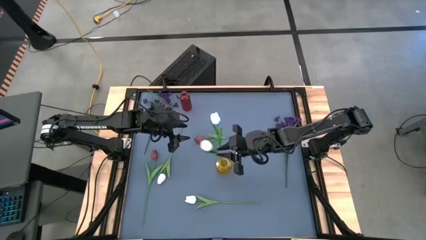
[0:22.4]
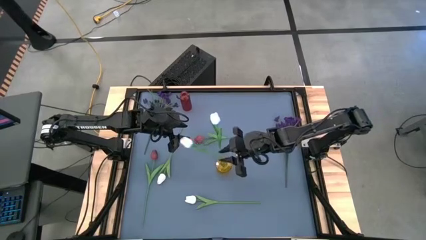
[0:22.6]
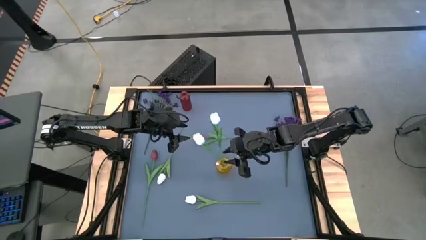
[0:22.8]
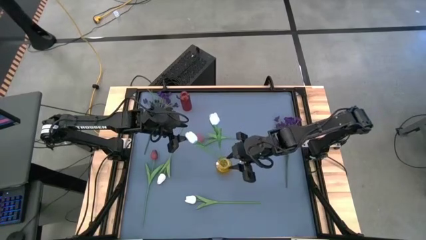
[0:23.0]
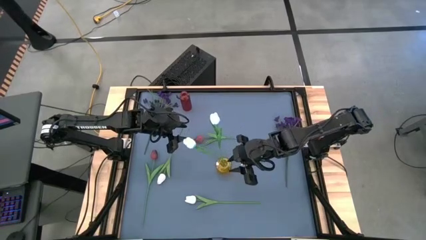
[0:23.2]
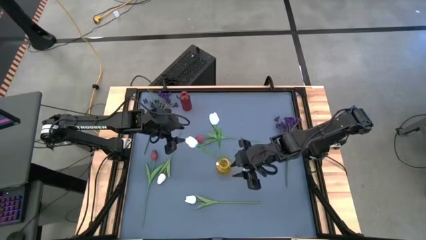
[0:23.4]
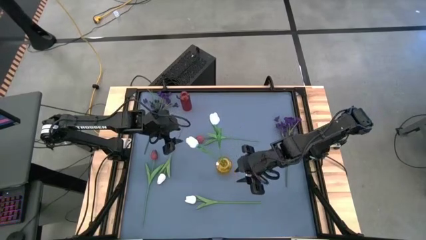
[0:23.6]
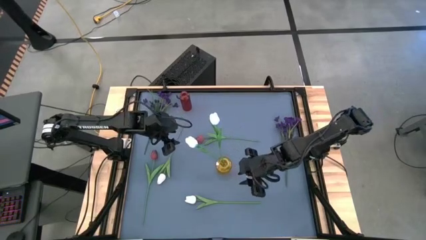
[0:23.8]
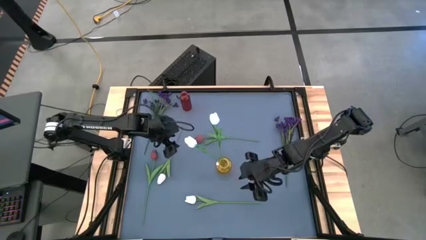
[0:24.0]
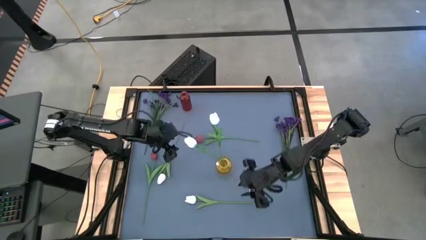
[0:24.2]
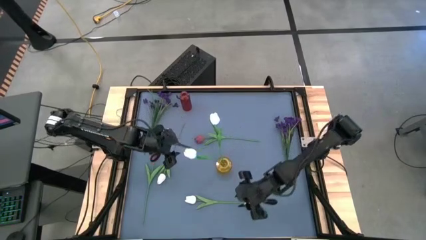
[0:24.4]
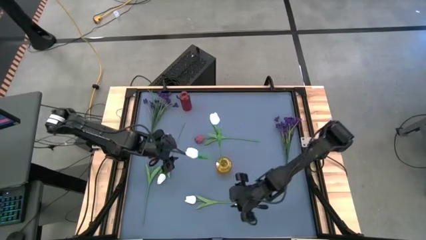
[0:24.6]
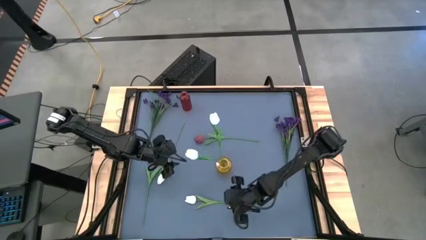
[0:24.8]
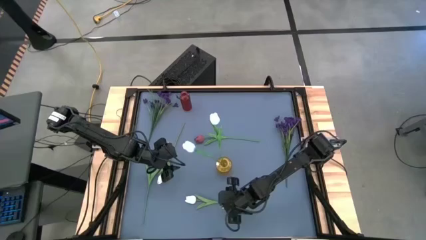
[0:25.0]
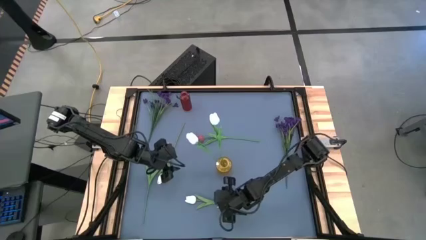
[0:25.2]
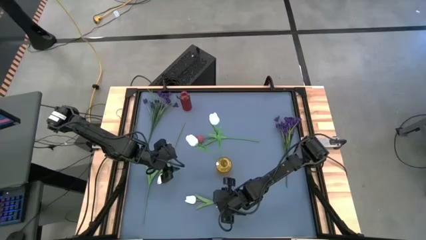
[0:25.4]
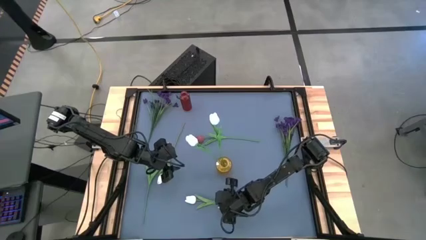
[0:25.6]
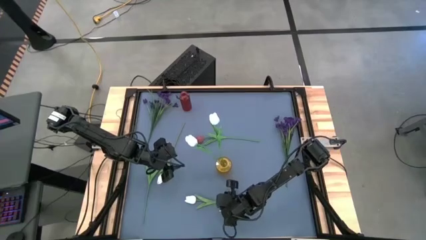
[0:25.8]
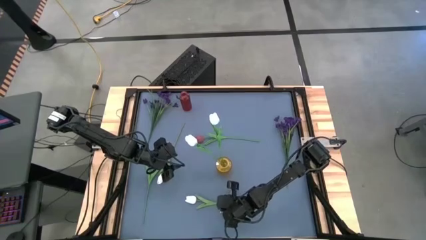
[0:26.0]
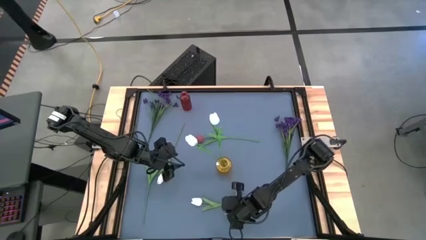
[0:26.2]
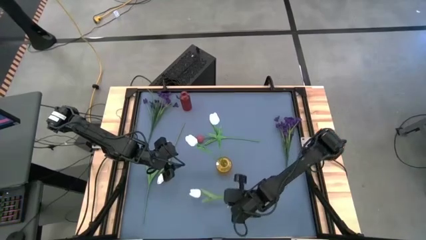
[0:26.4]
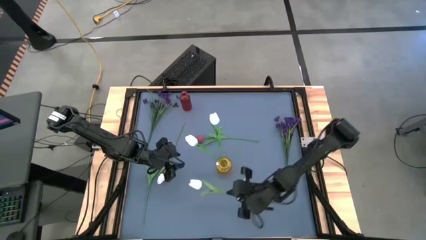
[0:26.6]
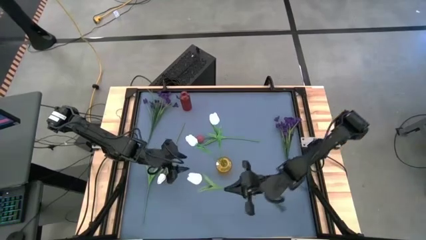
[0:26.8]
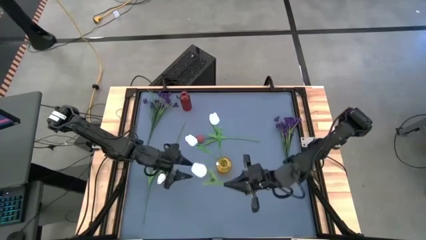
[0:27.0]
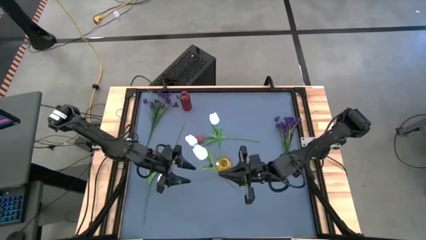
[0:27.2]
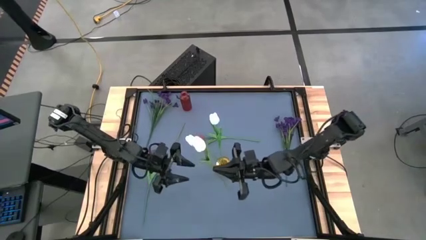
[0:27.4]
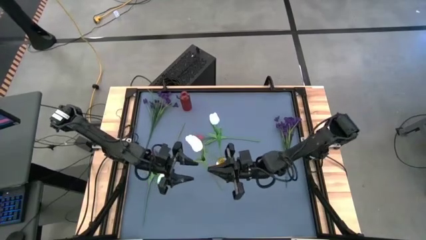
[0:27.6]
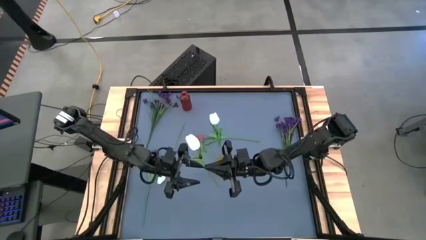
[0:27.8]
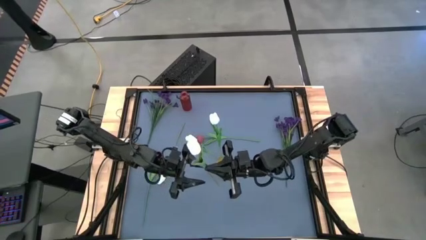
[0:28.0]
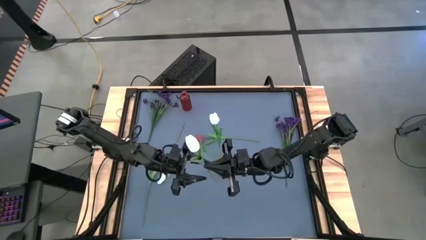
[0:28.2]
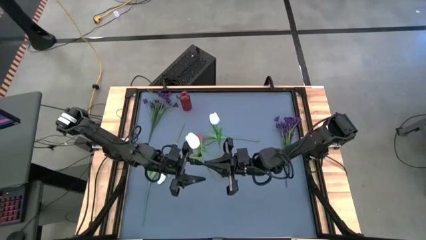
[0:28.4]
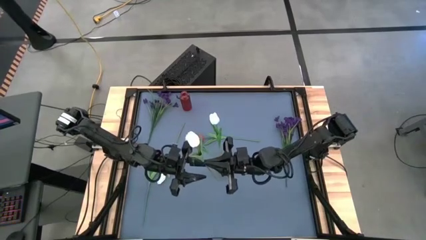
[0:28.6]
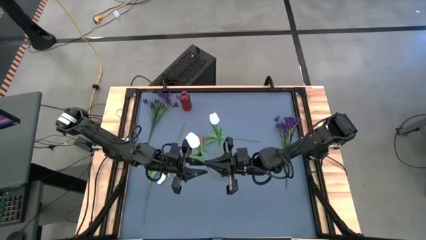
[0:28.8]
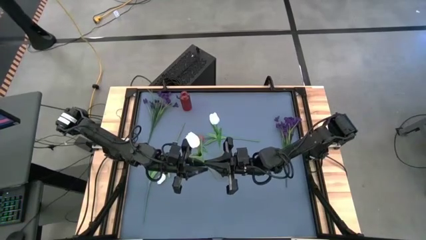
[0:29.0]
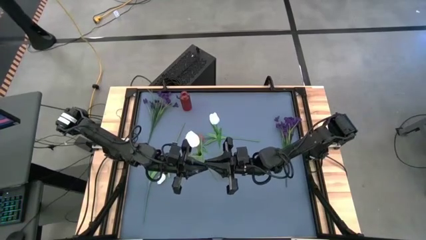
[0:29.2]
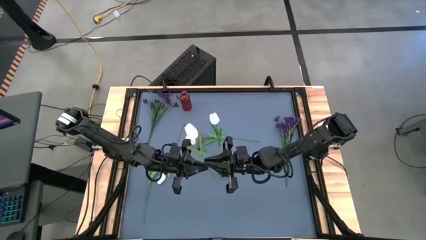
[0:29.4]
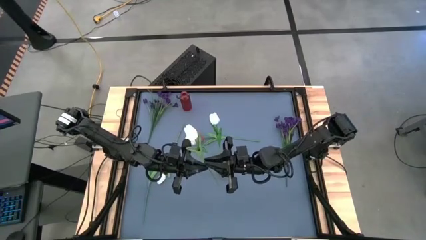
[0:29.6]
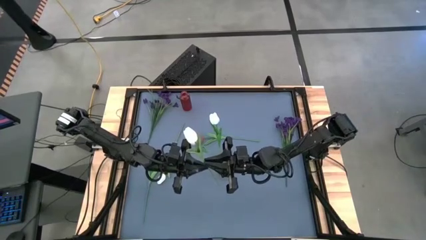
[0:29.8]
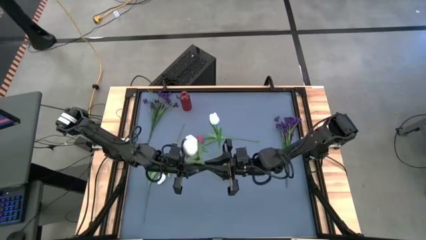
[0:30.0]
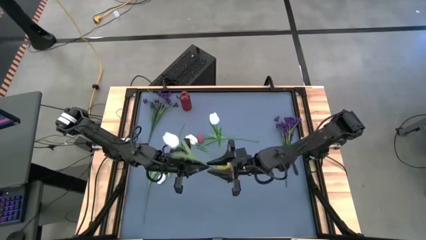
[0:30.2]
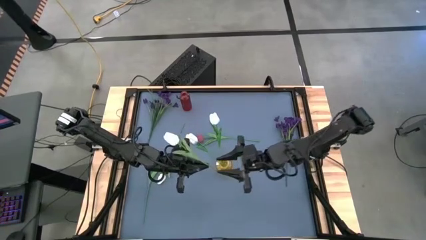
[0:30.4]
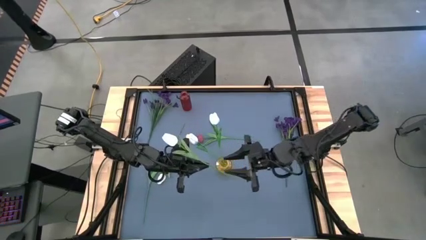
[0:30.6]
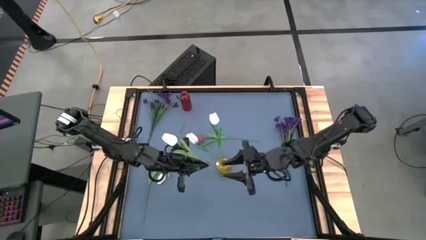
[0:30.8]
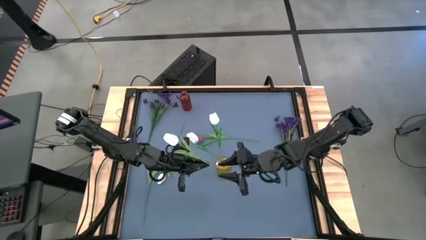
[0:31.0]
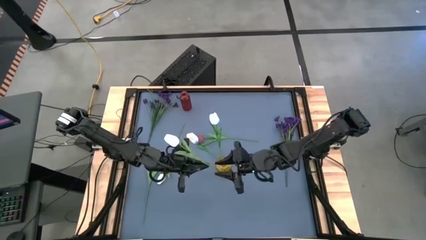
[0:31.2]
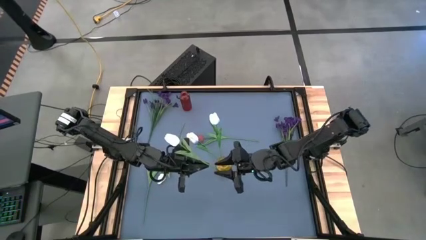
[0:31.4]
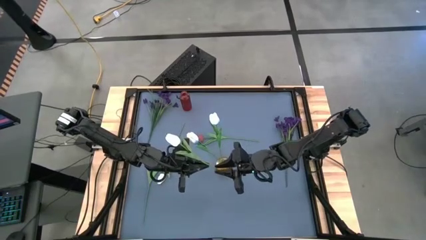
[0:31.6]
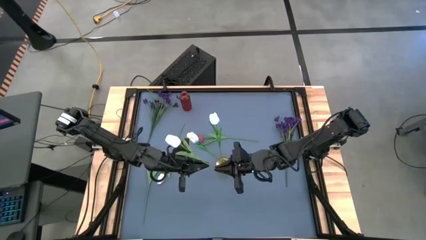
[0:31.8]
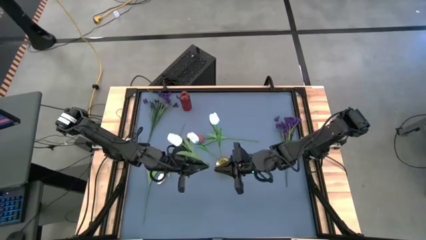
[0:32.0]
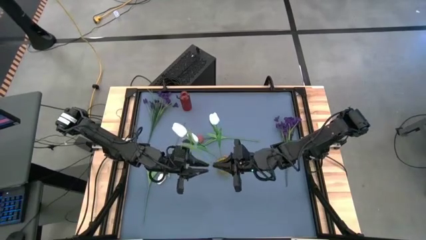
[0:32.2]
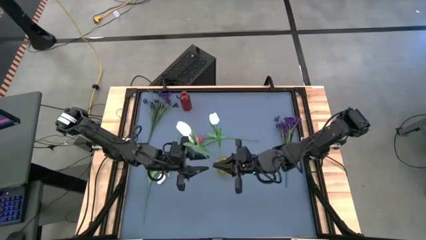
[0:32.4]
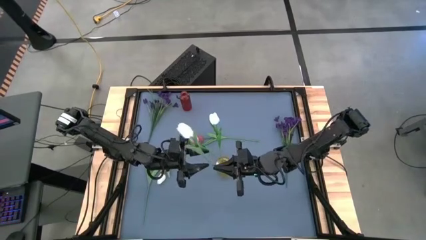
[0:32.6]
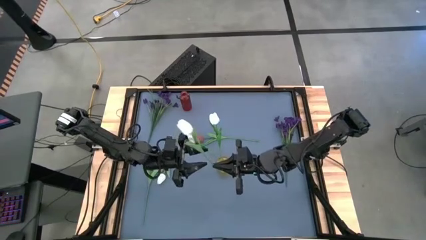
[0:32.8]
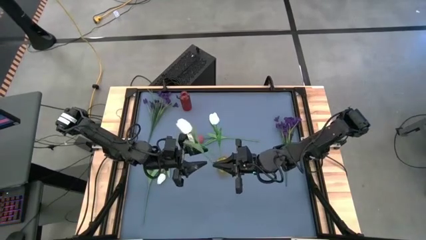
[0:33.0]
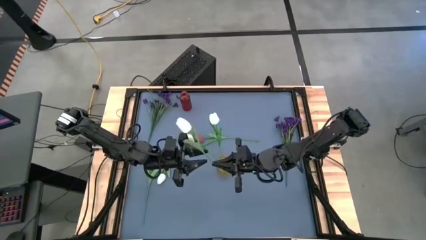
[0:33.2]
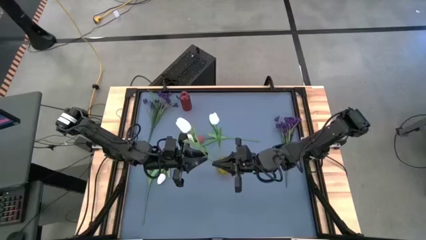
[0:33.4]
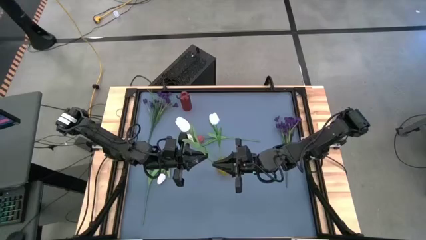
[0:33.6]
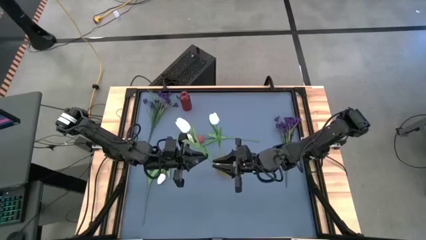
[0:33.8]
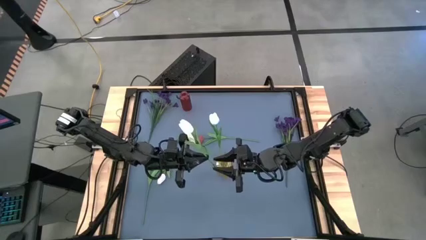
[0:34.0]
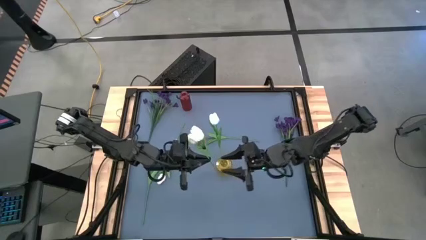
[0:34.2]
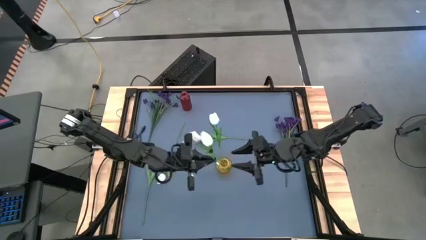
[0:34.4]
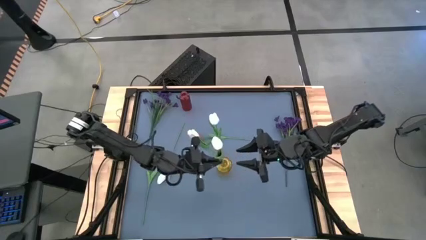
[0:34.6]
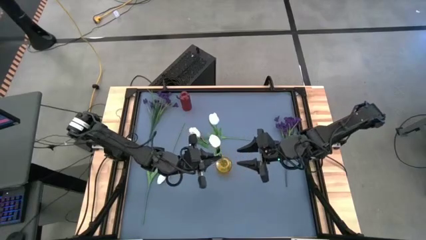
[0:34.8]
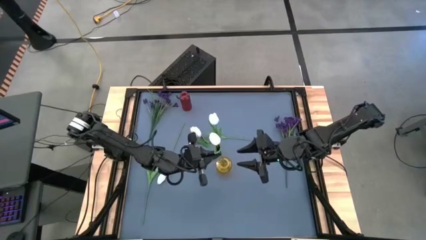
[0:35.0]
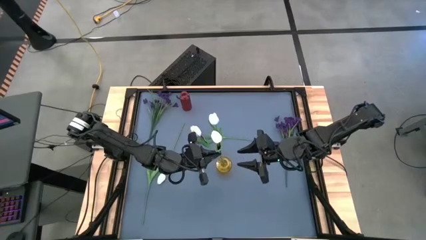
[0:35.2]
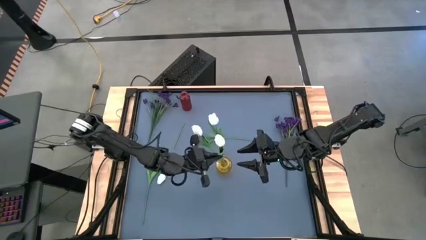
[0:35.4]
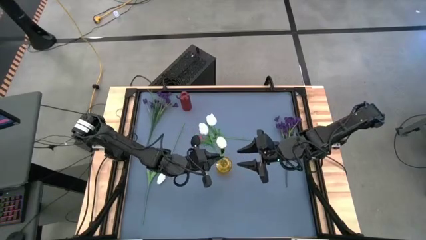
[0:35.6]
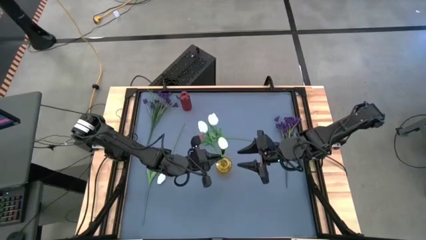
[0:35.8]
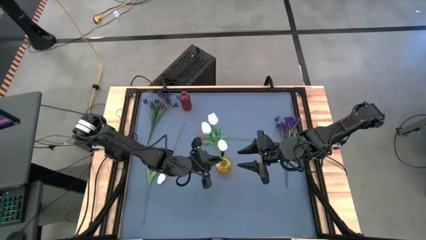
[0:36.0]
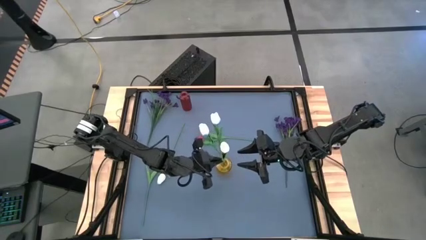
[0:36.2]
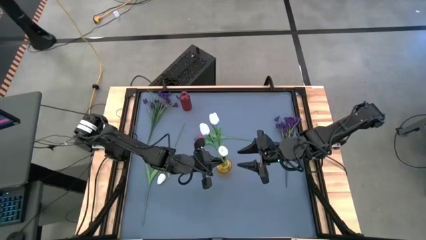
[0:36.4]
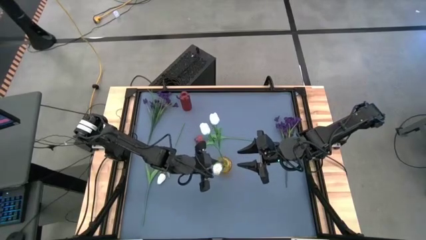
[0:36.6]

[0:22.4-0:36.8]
Task: Sort flowers into vase by color
Put the white flower into the yellow vase
